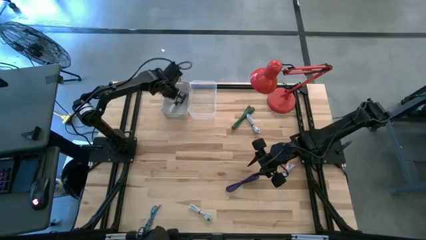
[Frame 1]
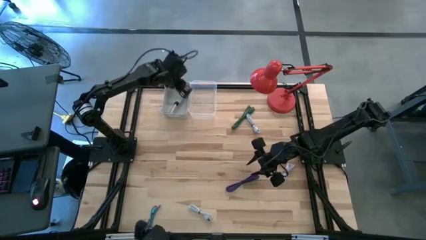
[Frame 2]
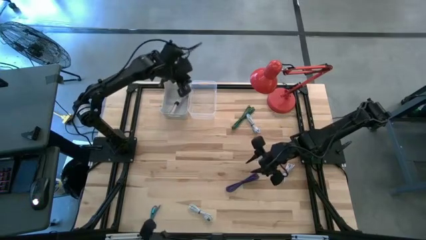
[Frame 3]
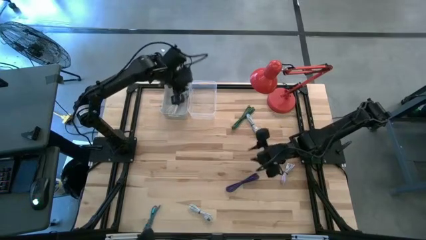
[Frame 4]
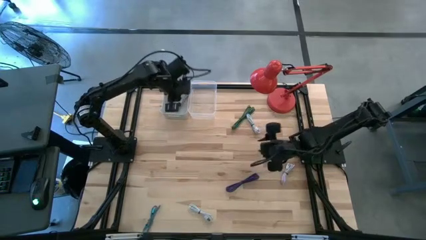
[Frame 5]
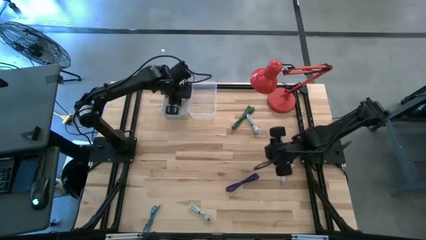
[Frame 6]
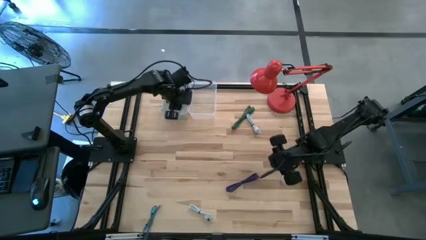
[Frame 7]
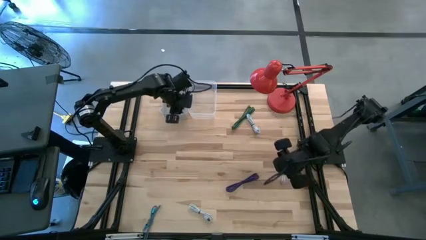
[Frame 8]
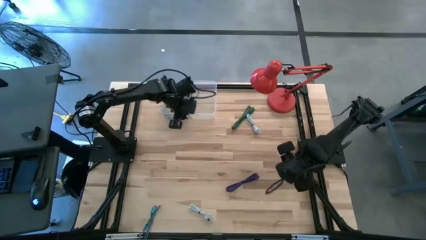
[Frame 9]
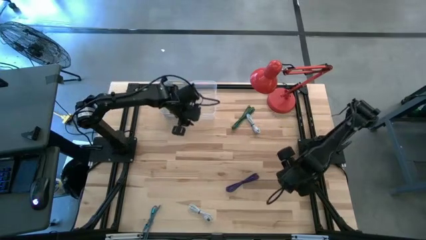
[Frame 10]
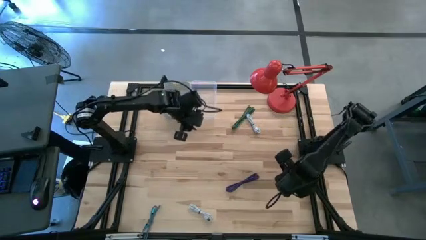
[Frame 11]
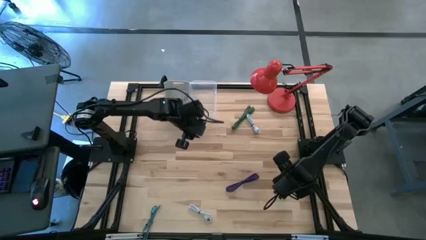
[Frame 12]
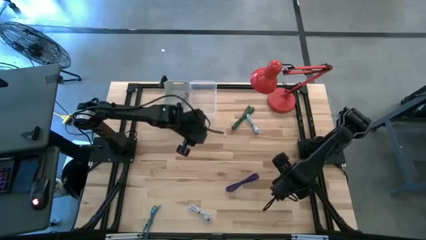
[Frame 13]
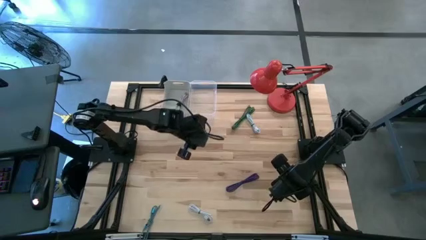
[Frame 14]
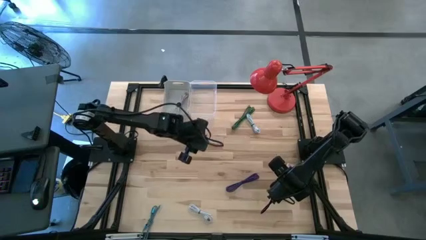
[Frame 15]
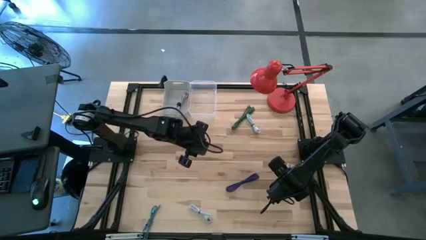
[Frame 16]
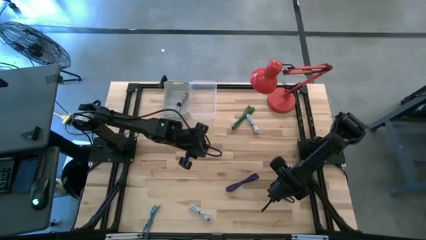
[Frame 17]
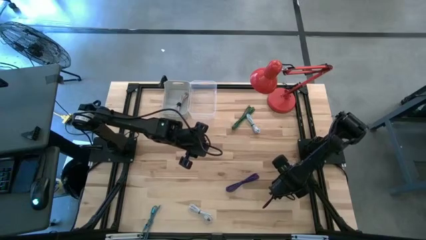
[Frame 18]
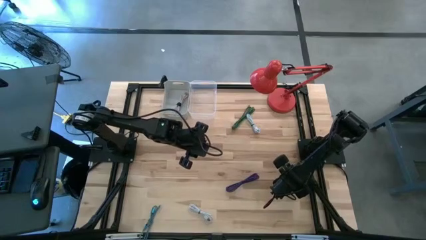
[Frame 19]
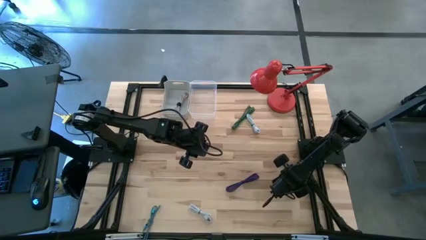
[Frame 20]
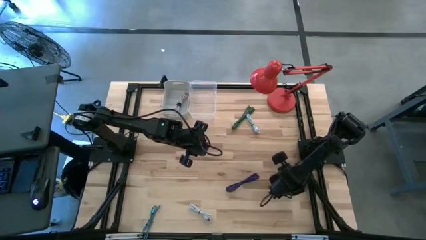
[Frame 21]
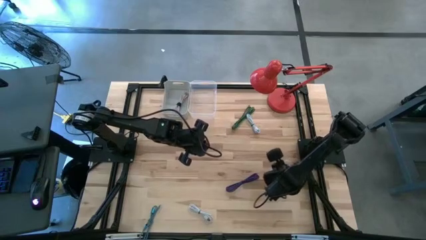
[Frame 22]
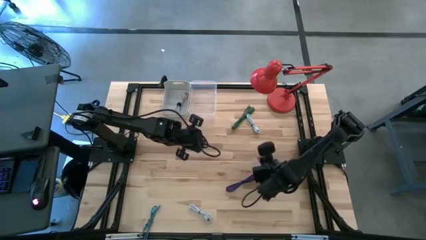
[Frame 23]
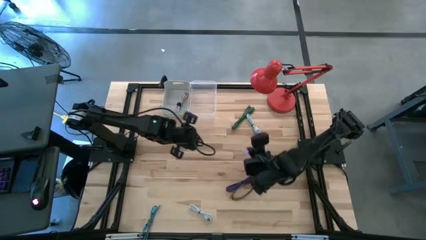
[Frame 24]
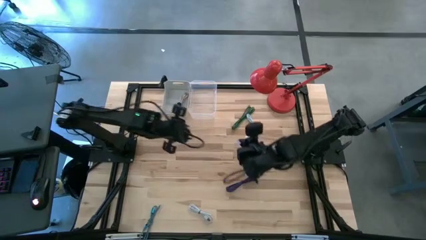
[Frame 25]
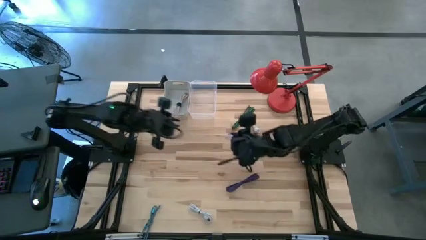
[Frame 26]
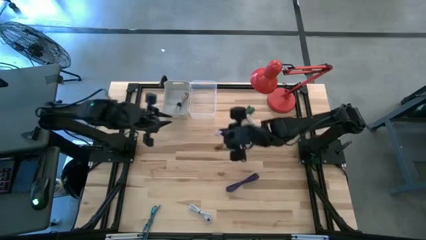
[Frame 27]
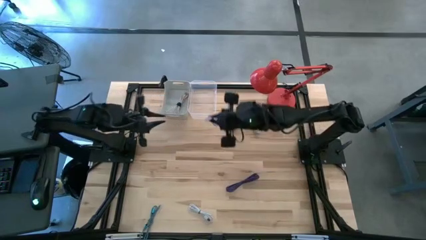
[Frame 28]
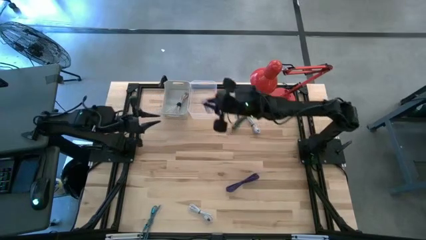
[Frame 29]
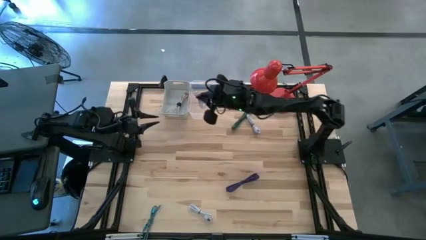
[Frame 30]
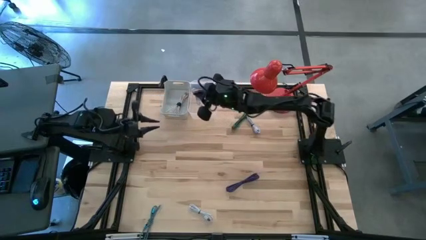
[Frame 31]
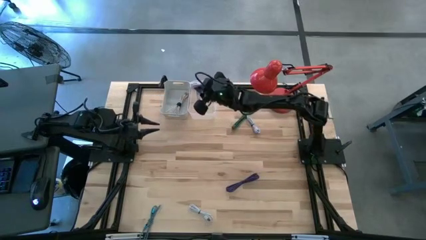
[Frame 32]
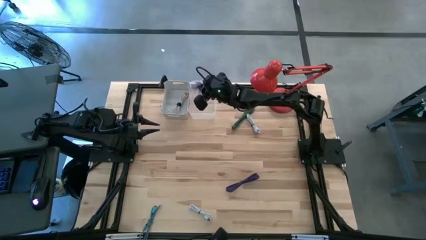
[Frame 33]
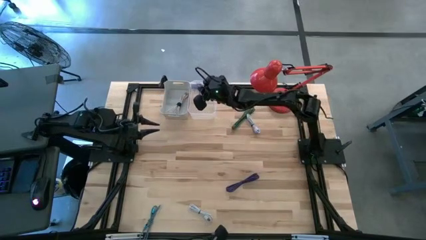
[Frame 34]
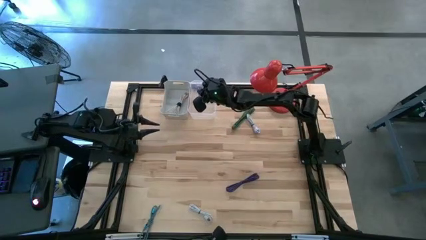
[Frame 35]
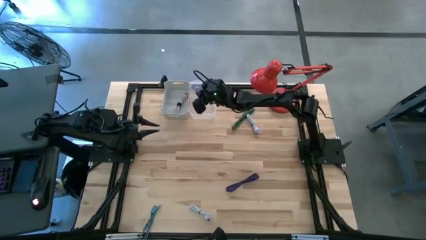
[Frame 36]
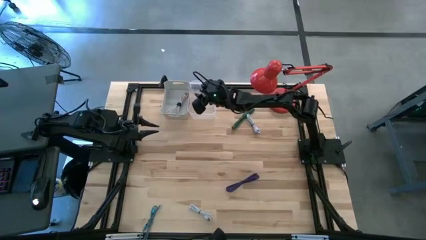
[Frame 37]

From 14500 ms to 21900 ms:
Task: Pick & Place USB Port
Put the light purple charger cable into the transparent bin

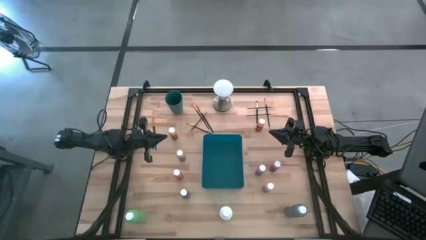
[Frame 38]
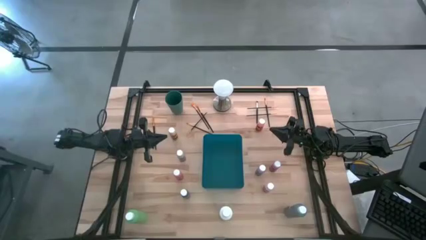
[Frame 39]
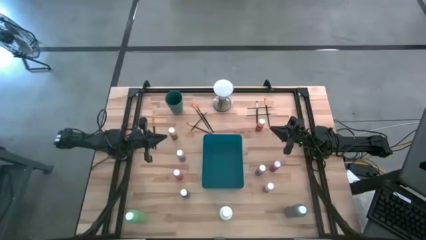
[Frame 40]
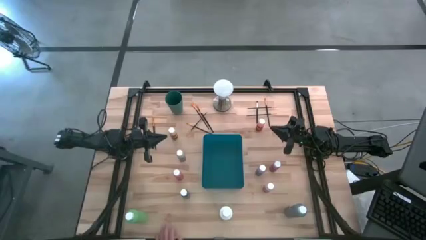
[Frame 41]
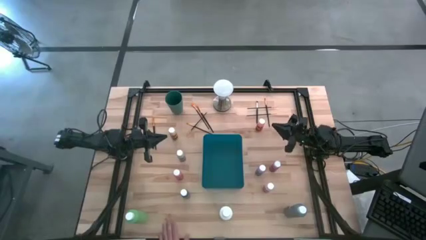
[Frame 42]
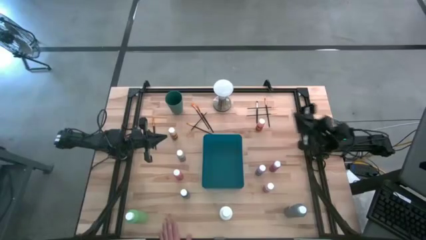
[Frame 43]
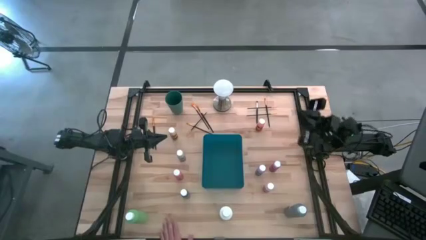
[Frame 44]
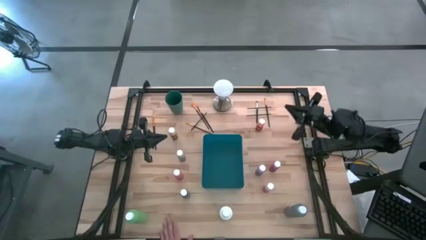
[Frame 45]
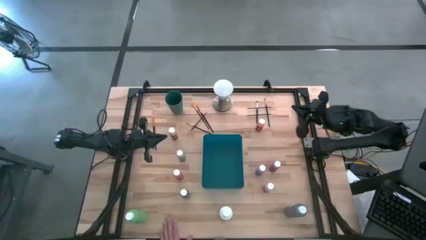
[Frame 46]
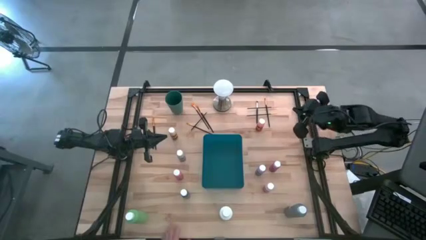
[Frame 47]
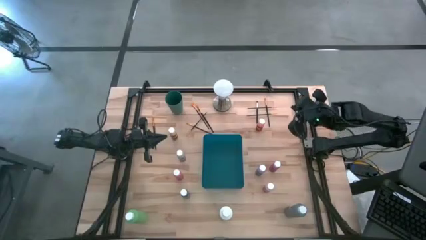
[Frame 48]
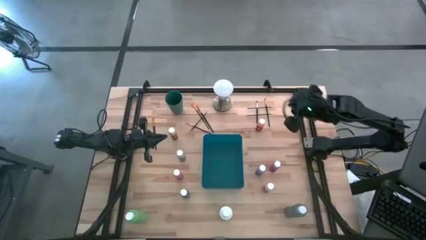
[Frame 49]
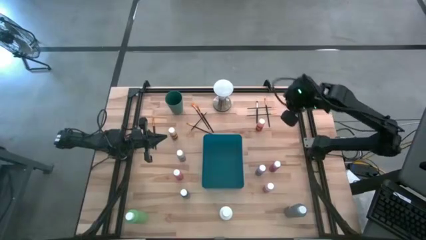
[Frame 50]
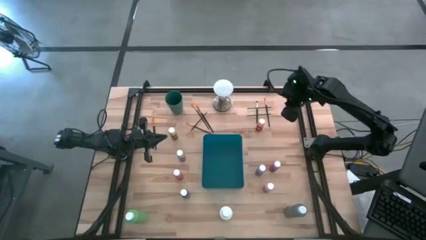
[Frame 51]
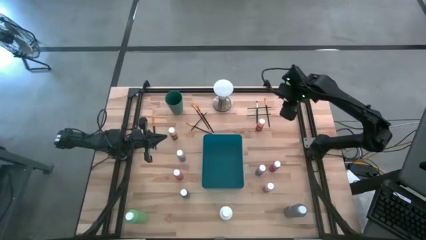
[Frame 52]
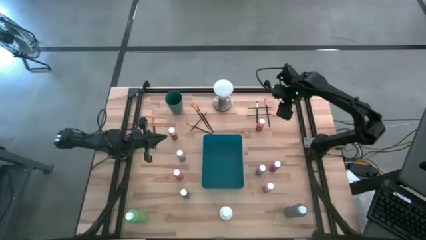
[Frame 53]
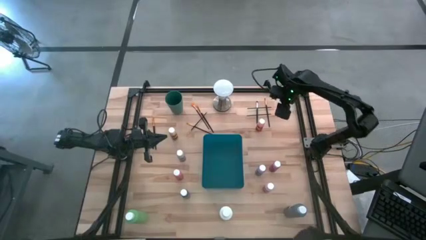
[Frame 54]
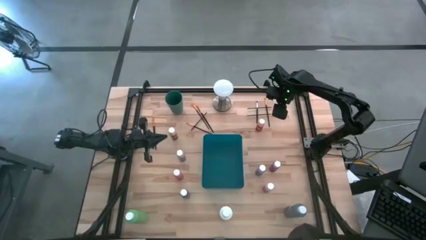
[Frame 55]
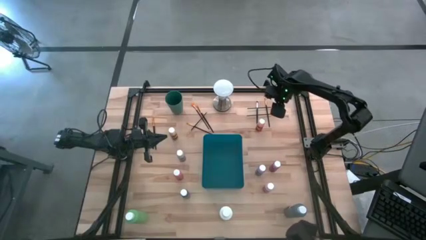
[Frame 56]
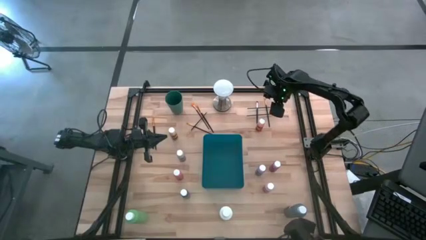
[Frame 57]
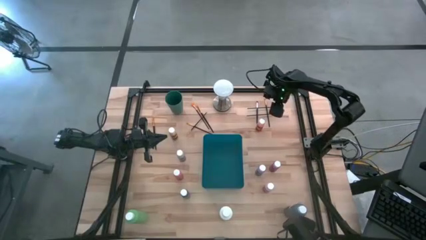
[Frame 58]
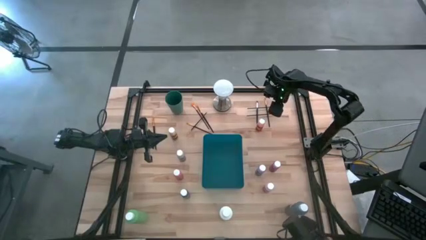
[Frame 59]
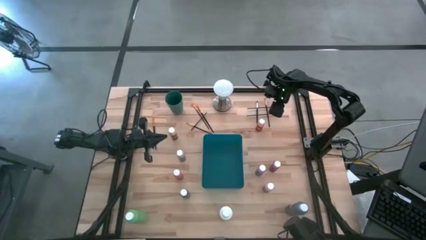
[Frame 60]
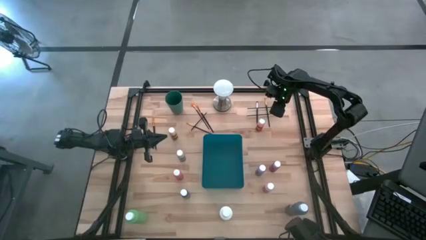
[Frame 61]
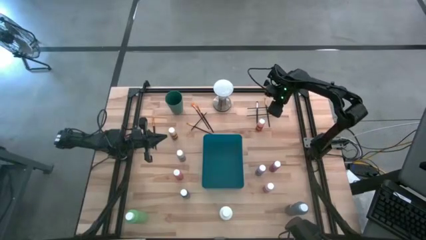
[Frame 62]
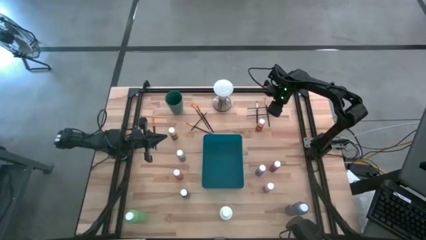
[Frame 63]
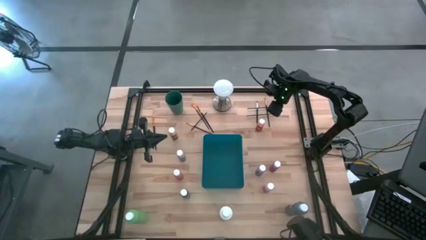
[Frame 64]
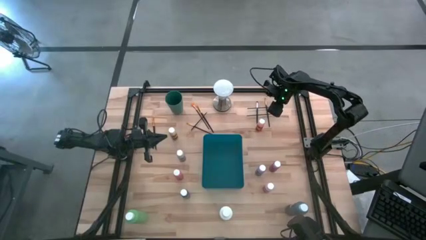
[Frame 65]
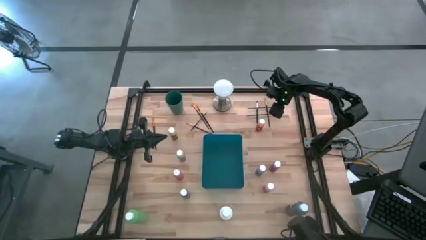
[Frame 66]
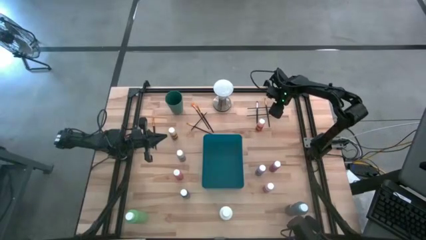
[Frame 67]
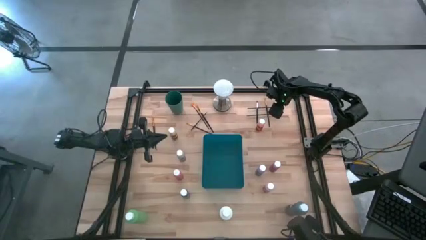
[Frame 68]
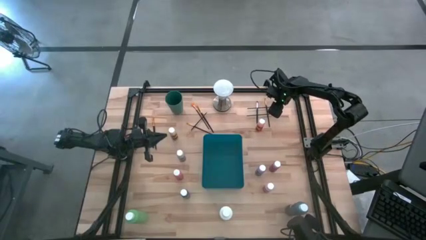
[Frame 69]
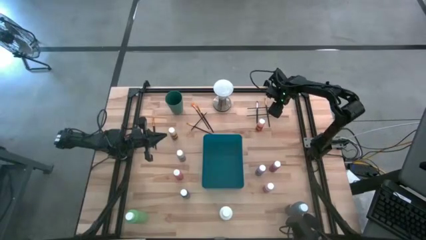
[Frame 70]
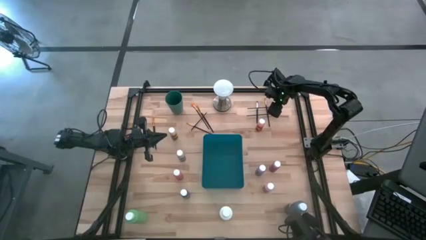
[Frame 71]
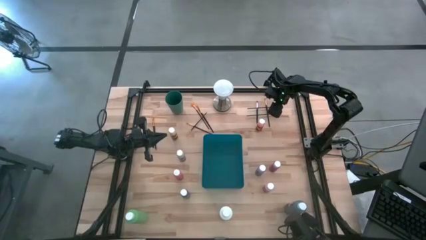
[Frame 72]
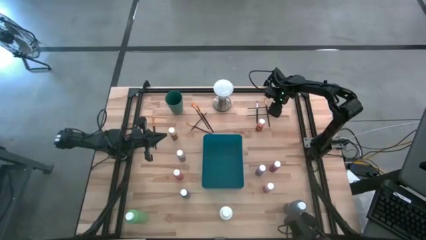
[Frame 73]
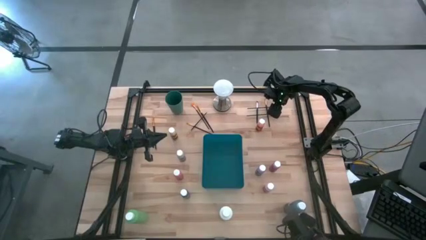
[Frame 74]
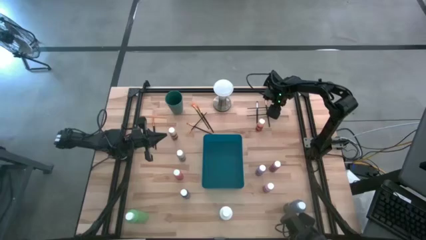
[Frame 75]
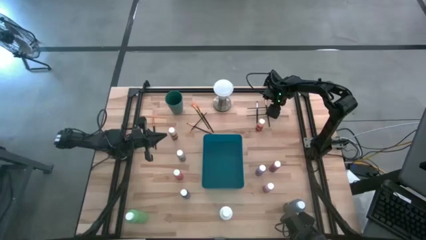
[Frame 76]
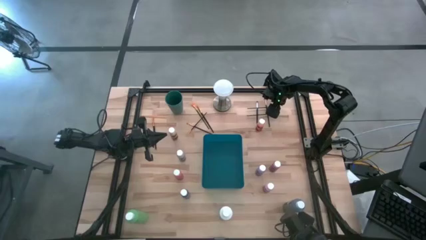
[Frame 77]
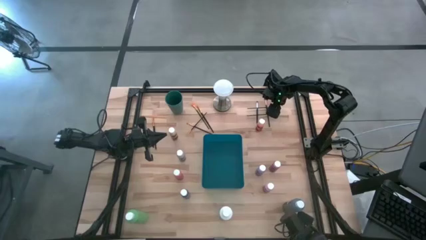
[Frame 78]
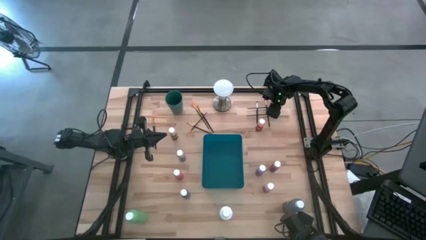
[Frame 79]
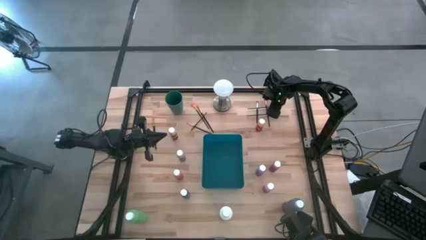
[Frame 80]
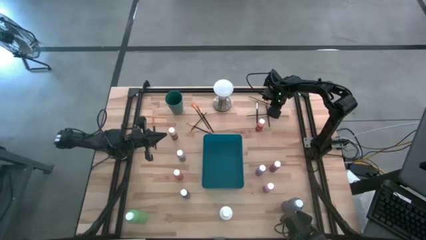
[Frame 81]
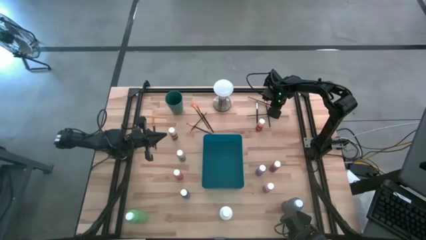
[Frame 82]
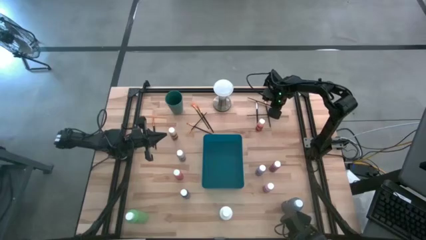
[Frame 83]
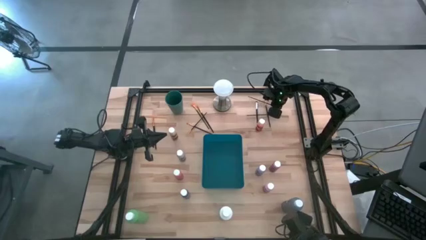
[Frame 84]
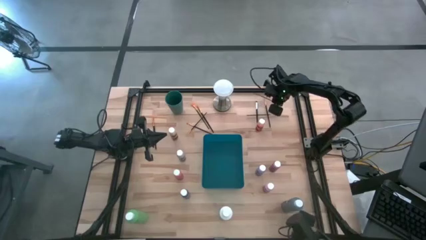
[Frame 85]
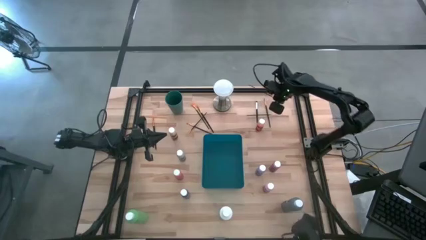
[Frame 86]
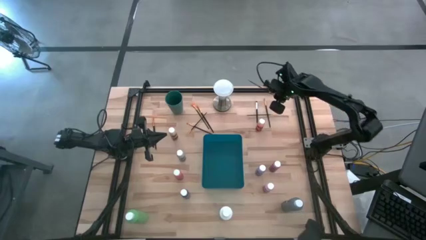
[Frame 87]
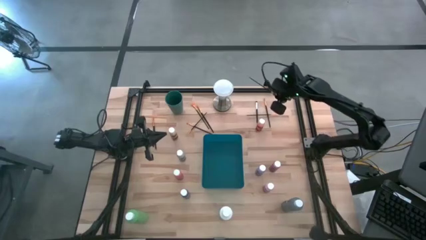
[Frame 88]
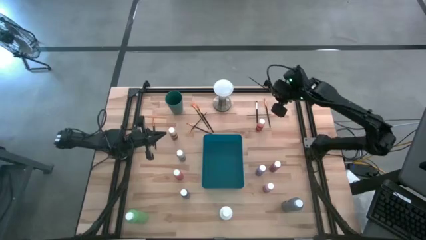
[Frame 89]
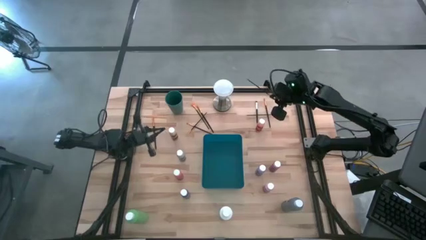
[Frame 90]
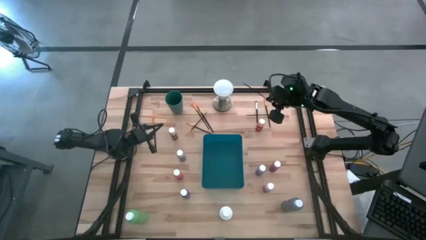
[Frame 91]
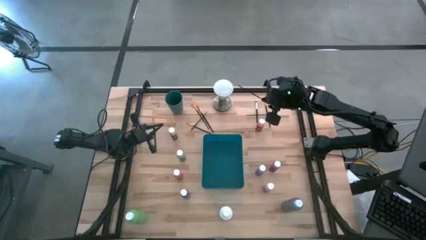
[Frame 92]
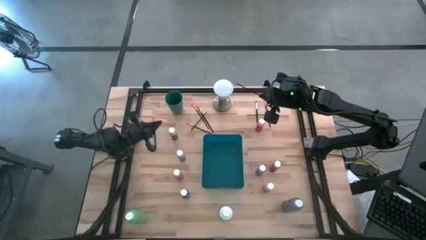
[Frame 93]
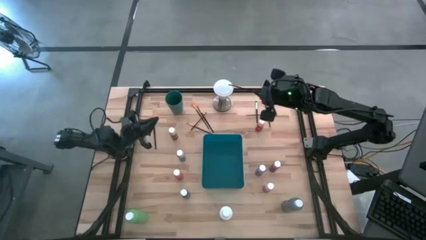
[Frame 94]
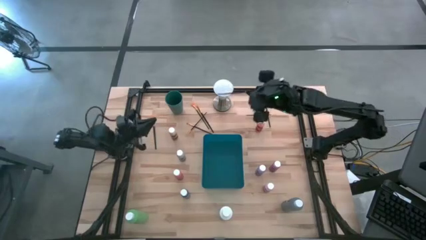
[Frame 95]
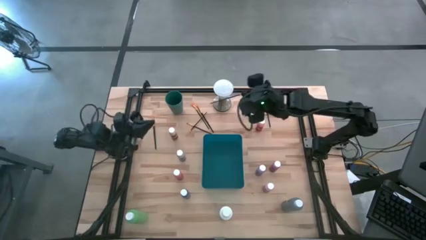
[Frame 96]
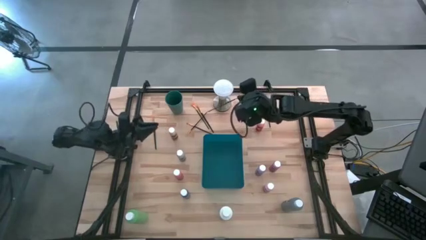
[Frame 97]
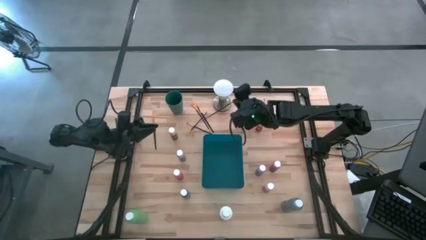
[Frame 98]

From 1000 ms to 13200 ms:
Task: Pick & Place Paint Supplies
Put the yellow paint brush into the green cup
